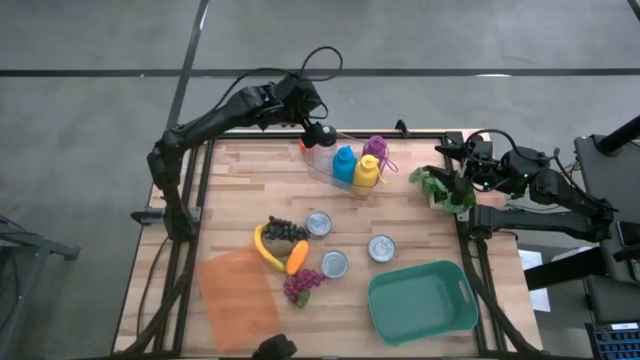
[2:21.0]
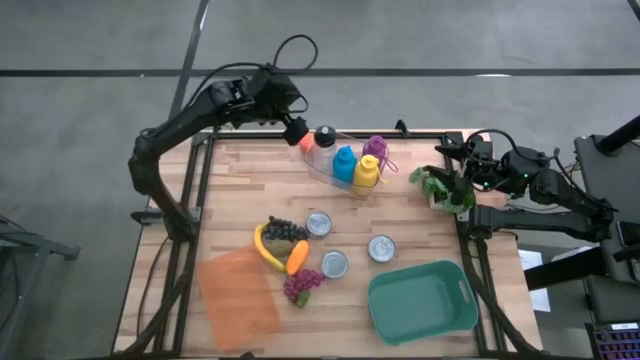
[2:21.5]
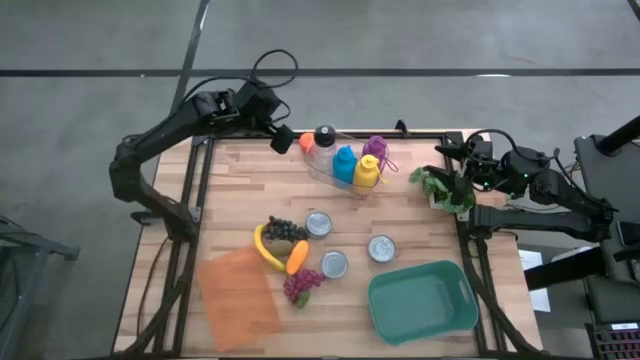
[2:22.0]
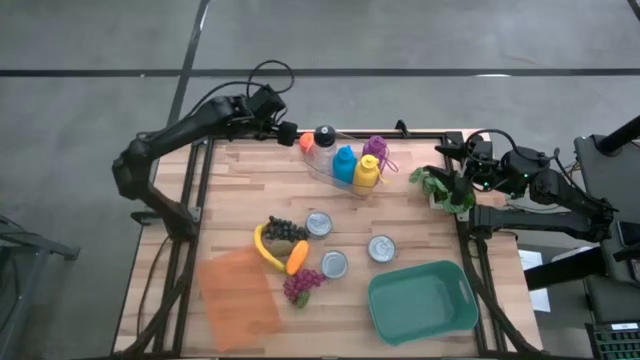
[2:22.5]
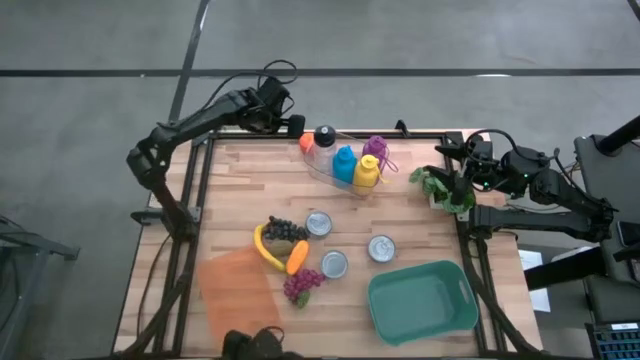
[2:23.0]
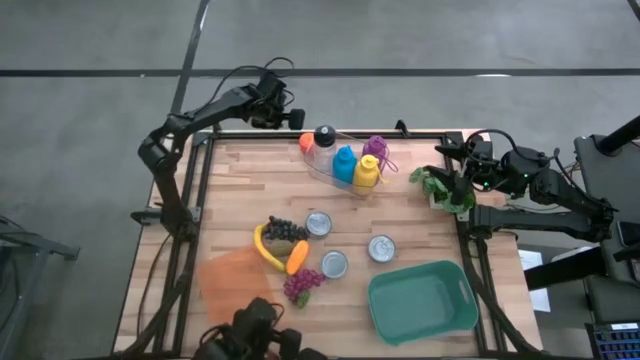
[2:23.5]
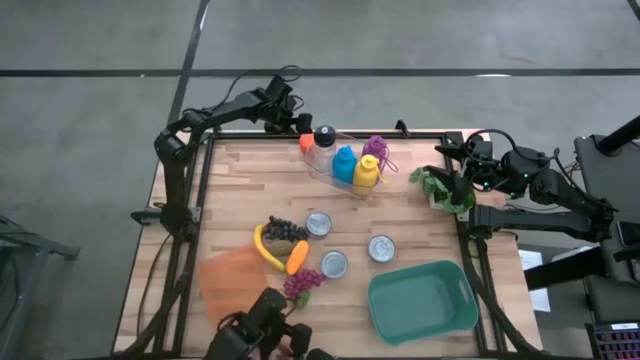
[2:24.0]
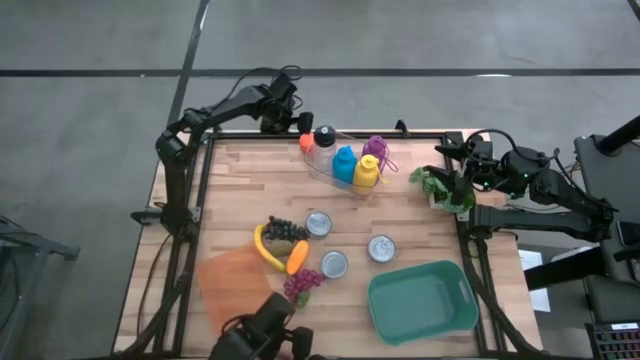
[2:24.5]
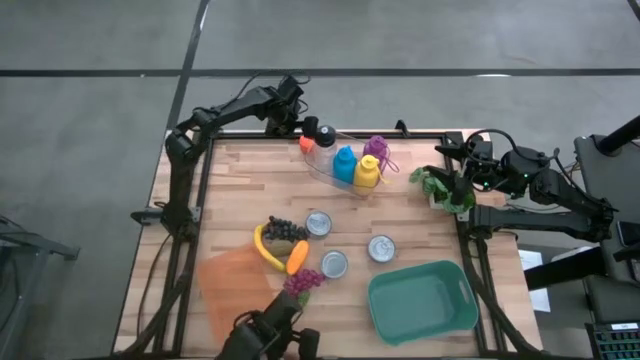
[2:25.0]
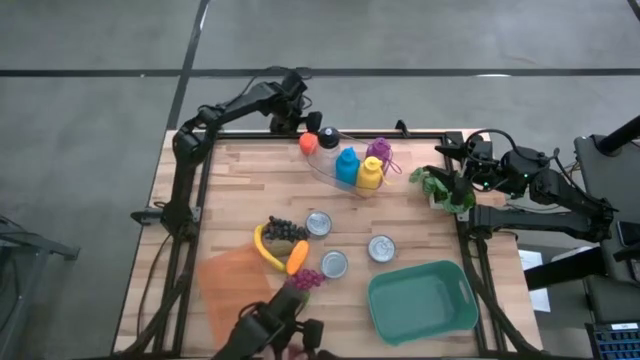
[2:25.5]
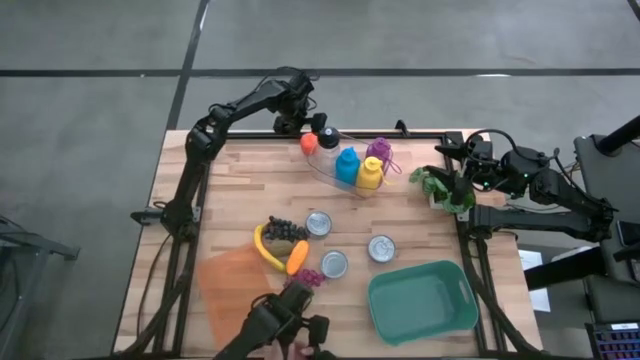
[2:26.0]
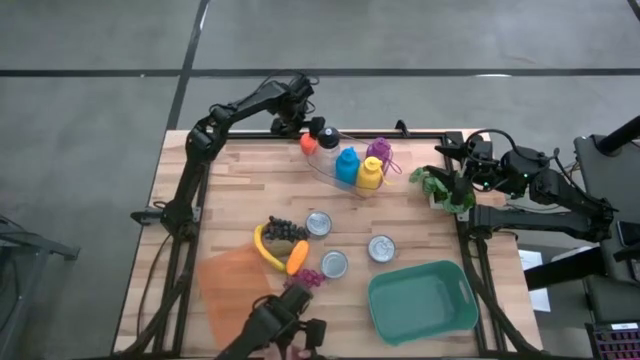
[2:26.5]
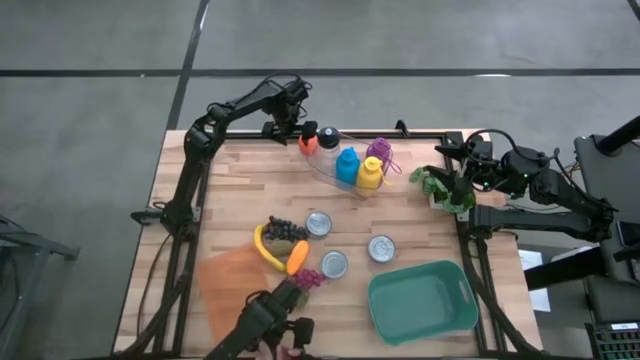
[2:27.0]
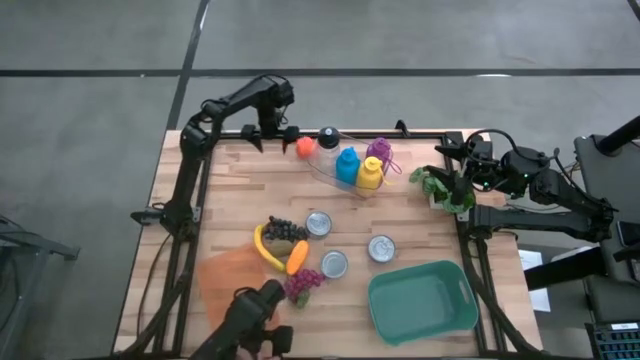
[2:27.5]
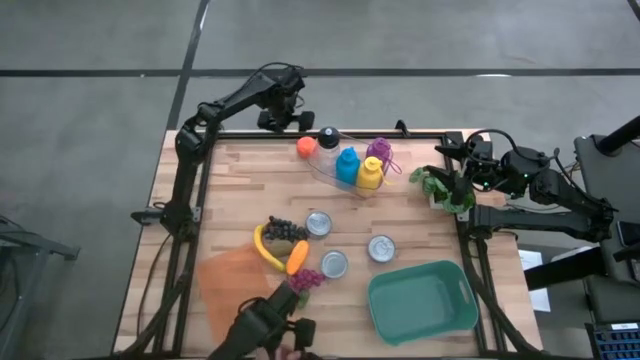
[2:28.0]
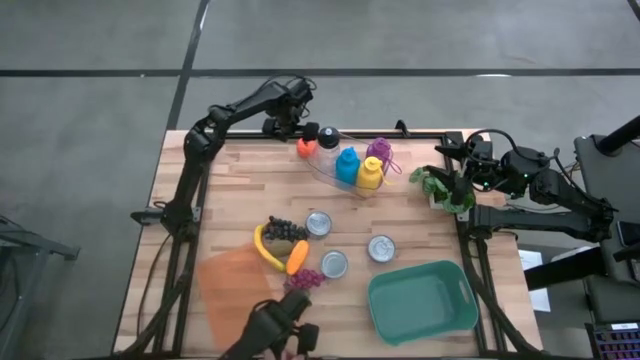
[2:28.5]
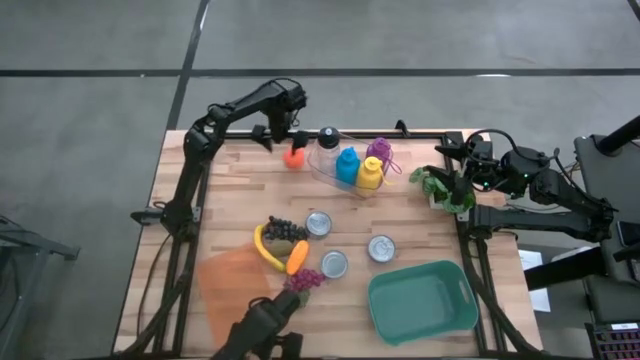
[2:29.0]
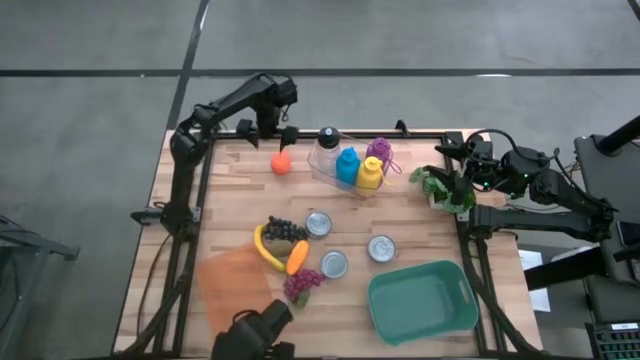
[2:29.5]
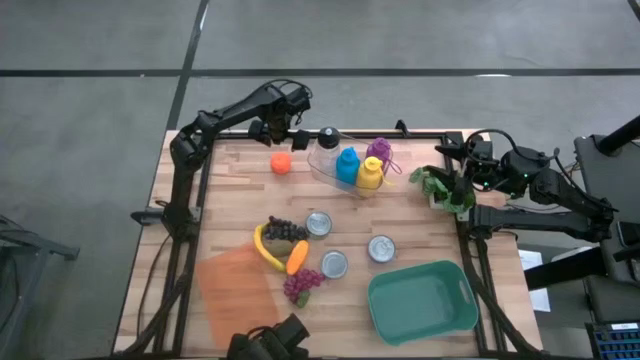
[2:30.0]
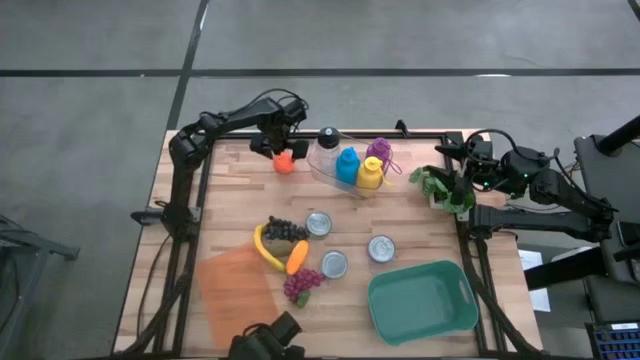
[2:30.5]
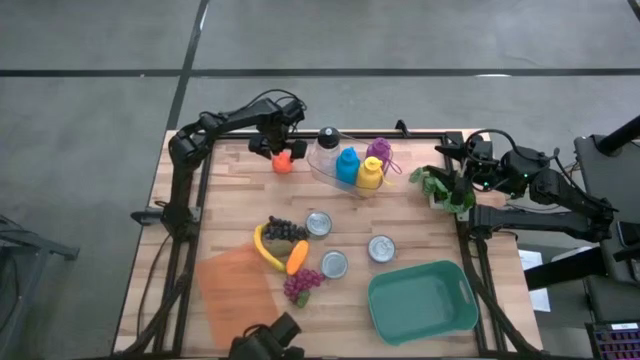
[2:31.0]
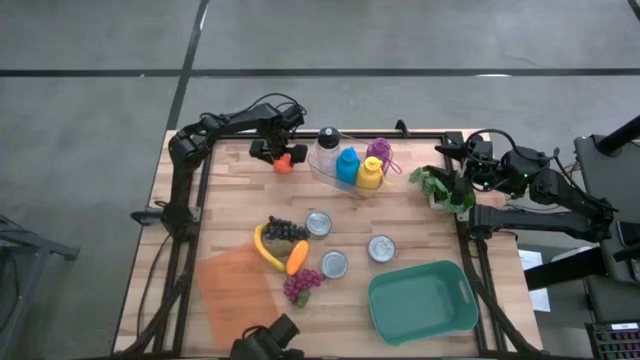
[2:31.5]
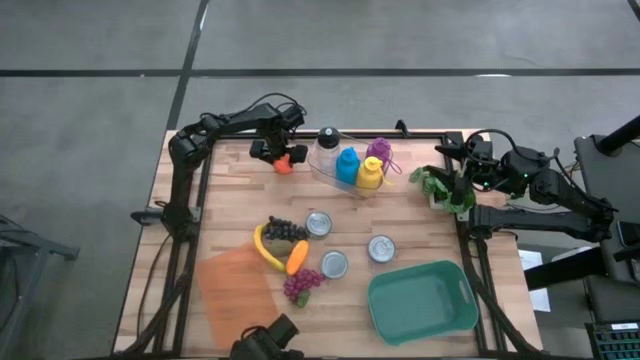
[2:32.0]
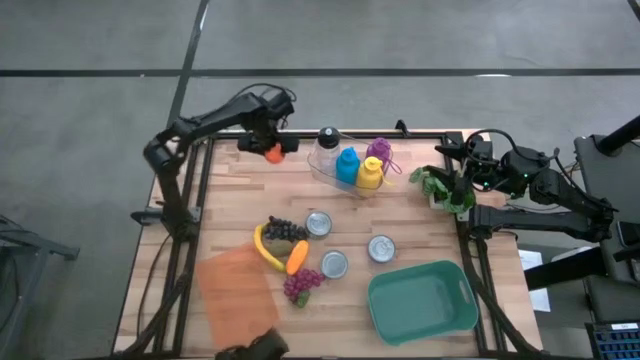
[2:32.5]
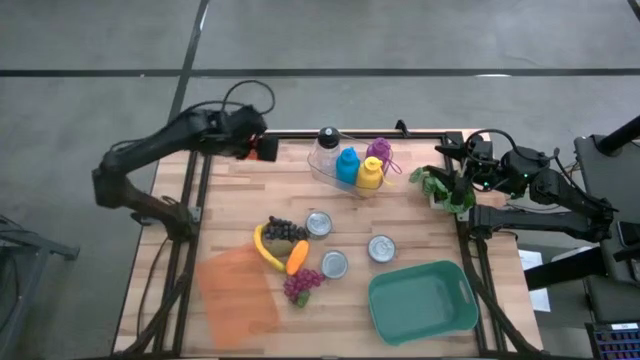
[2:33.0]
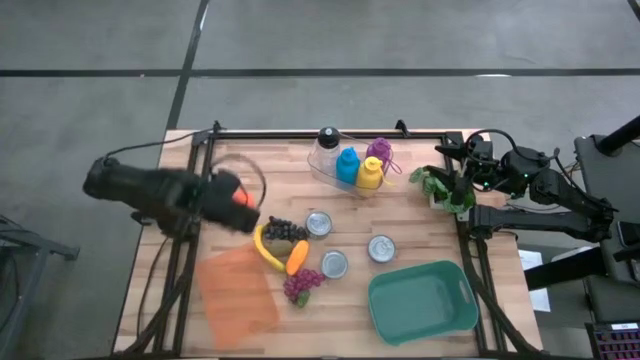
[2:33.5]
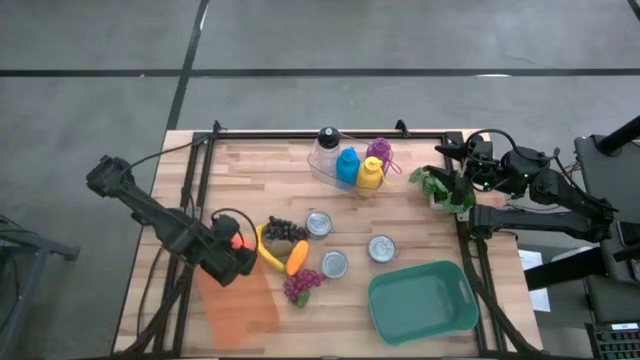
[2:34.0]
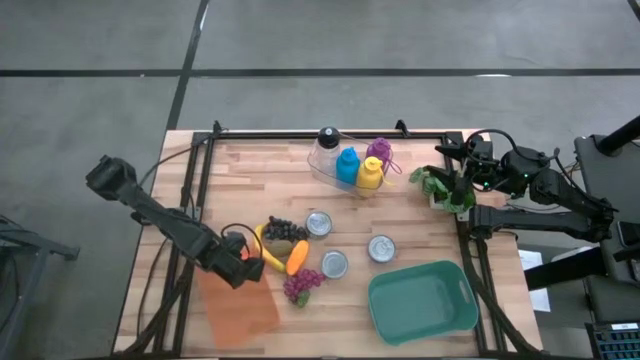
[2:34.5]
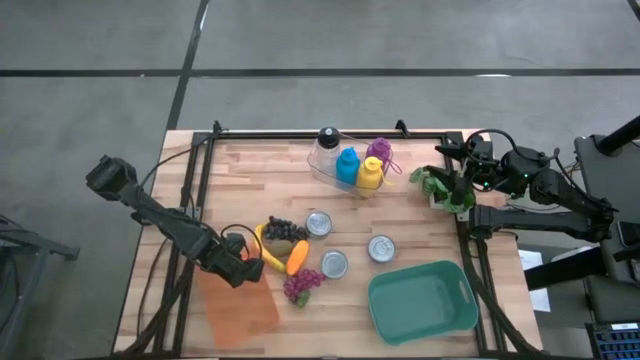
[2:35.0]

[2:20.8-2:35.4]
Task: Pick & Place Food Item
Put the orange into the orange bin

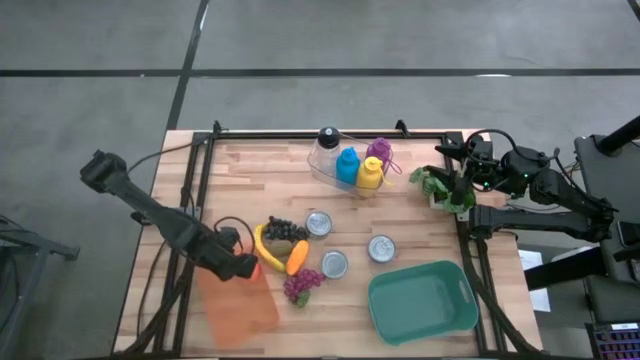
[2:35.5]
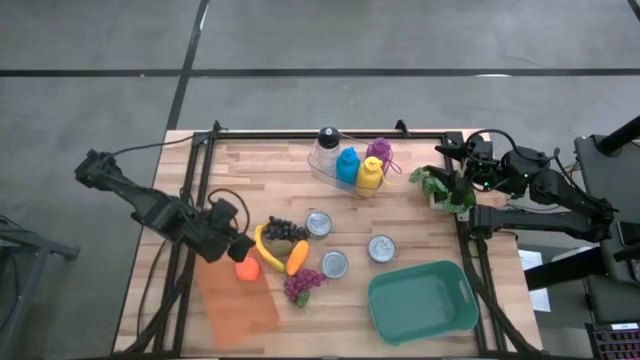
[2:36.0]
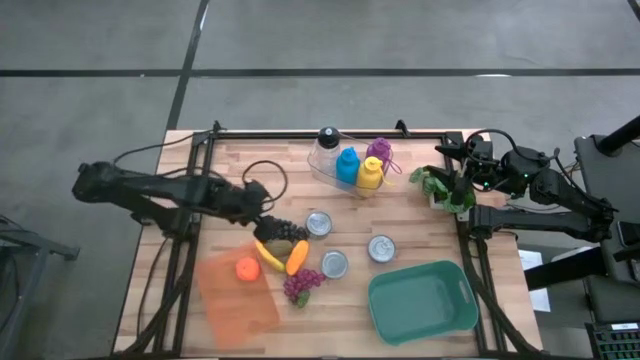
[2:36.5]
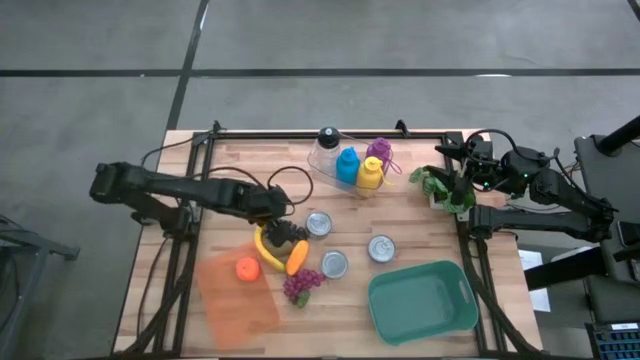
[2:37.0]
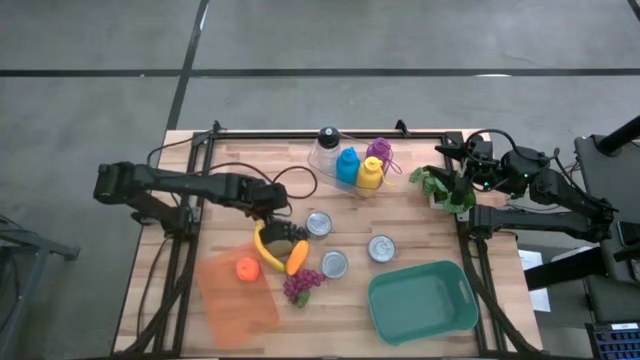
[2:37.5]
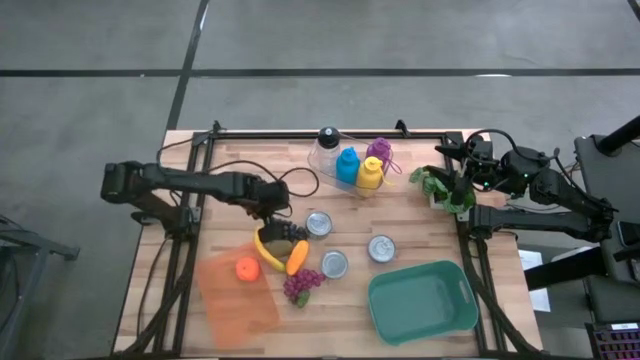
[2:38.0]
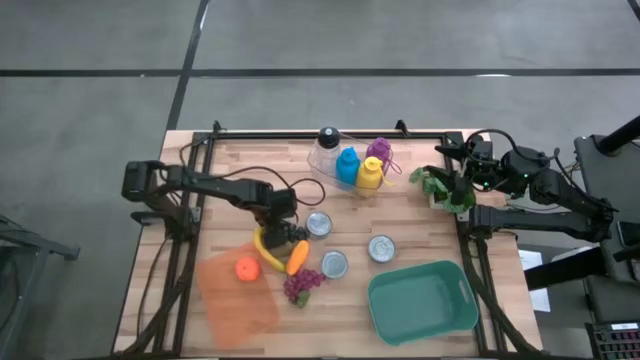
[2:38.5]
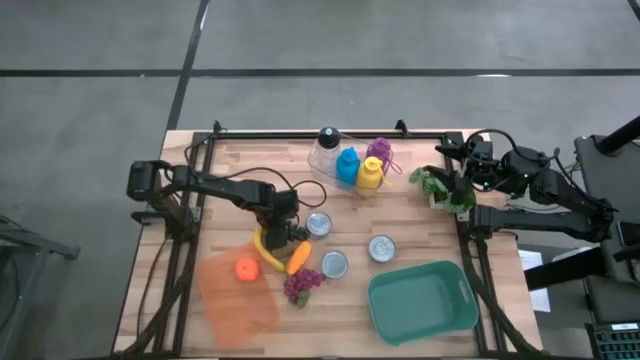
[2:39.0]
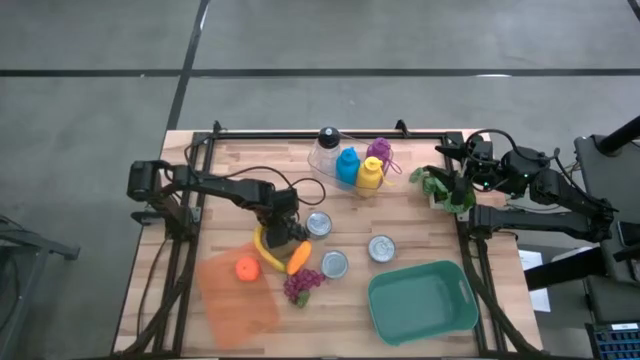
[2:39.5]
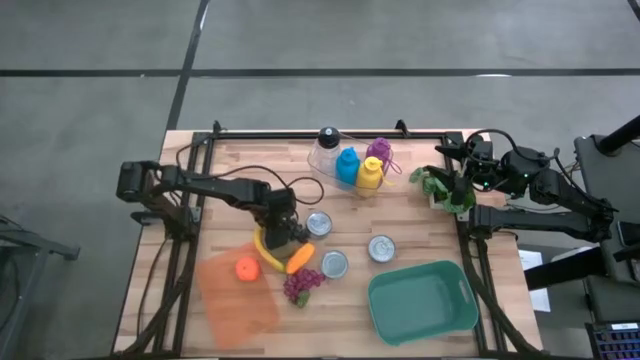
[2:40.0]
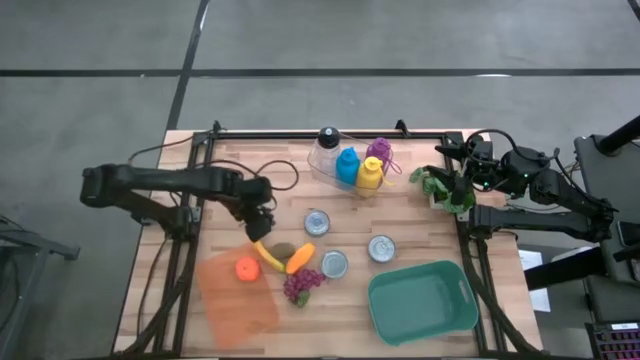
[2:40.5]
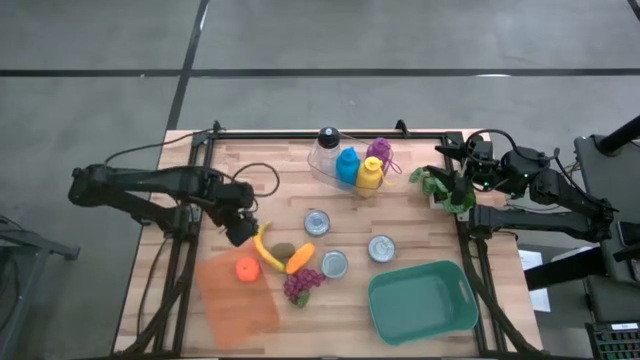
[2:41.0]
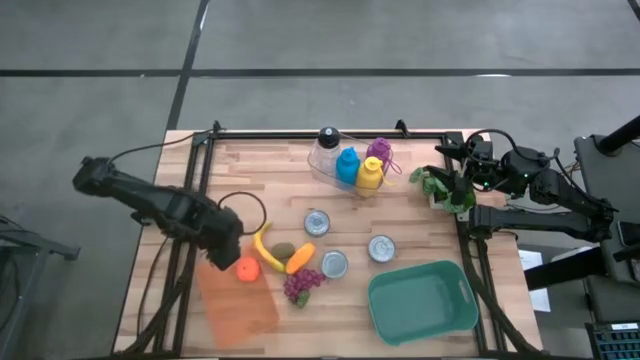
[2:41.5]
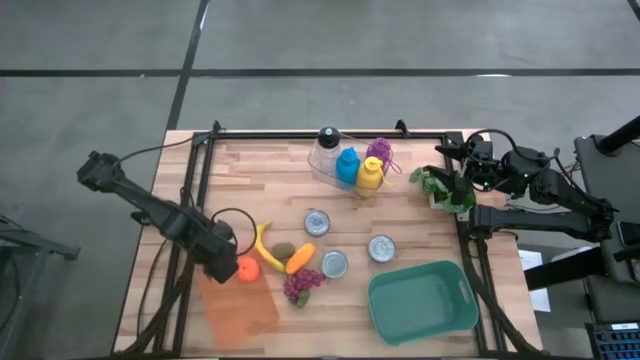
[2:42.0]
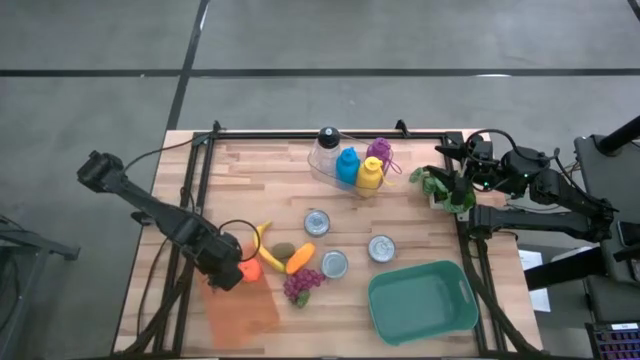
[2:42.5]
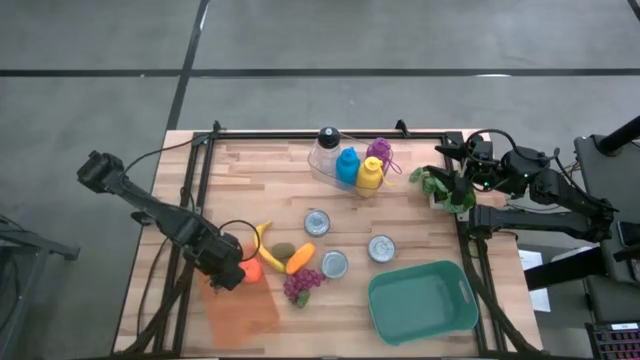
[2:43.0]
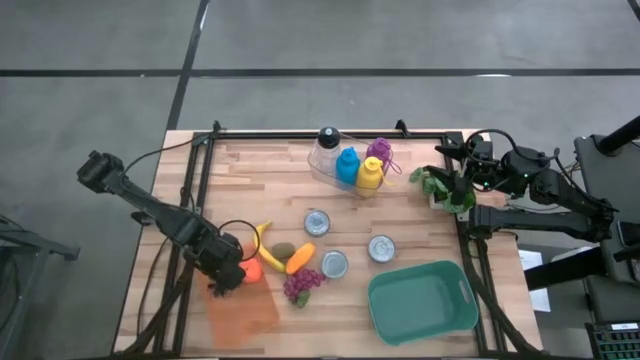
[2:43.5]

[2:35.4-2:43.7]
Put the black grapes into the orange bin
